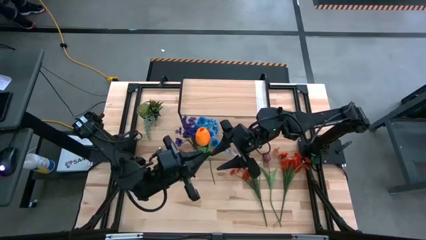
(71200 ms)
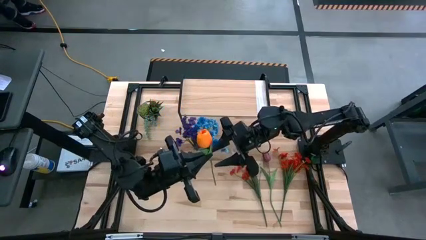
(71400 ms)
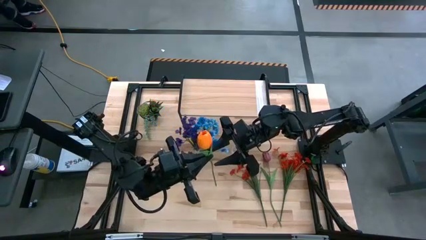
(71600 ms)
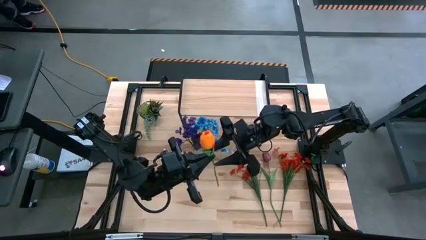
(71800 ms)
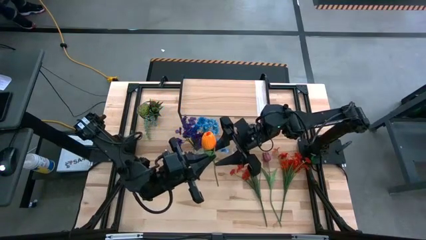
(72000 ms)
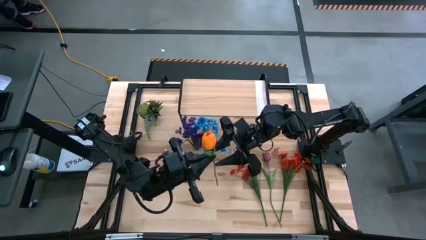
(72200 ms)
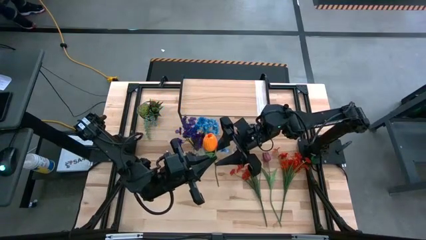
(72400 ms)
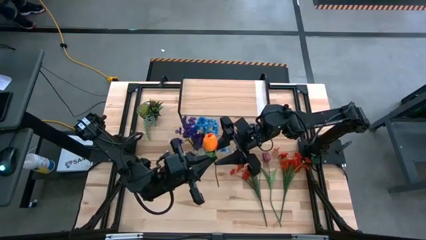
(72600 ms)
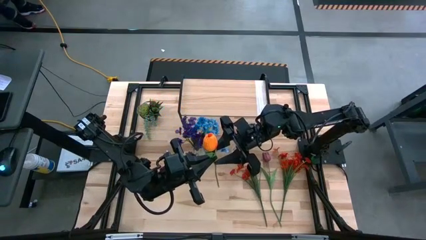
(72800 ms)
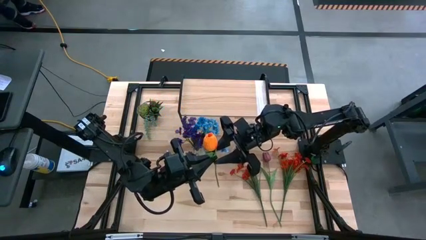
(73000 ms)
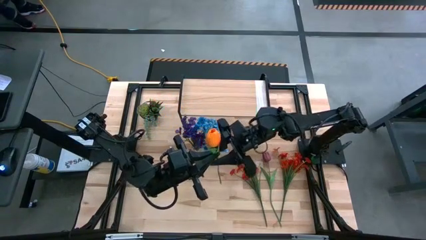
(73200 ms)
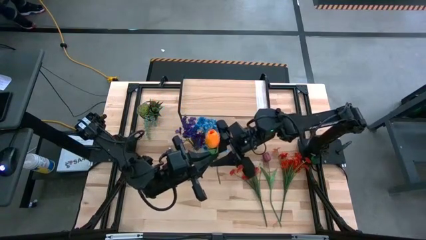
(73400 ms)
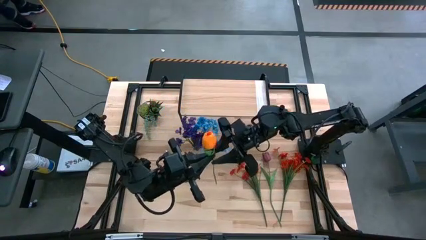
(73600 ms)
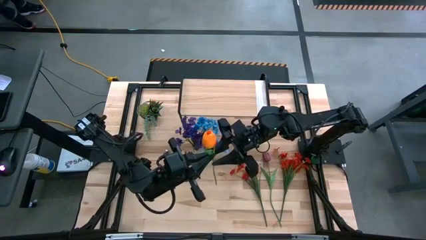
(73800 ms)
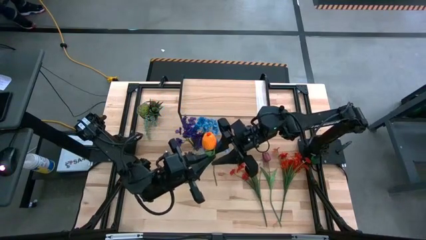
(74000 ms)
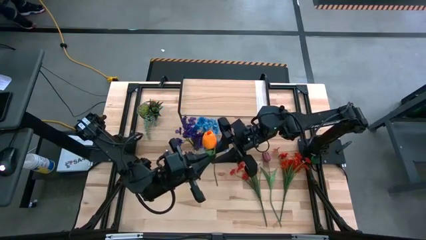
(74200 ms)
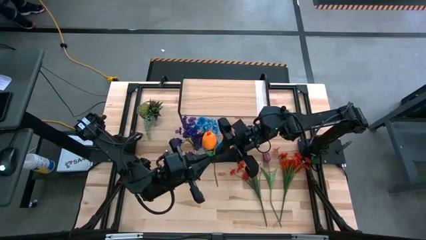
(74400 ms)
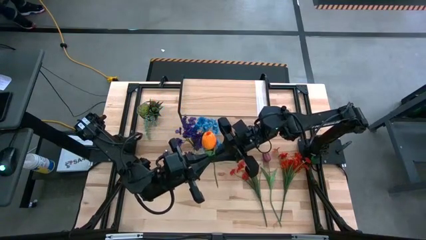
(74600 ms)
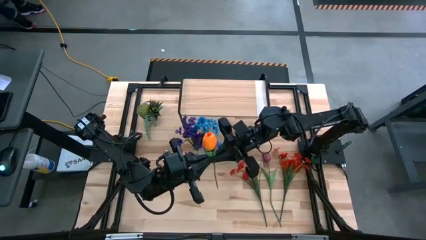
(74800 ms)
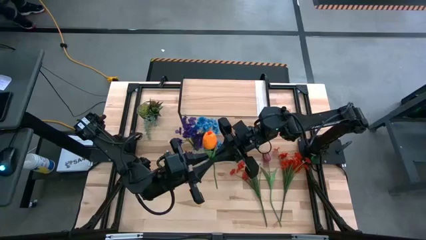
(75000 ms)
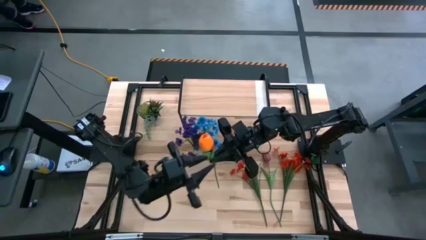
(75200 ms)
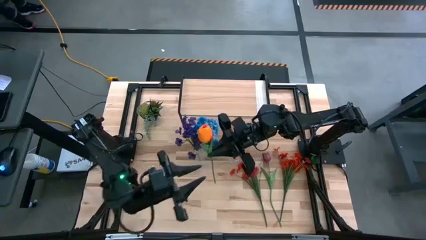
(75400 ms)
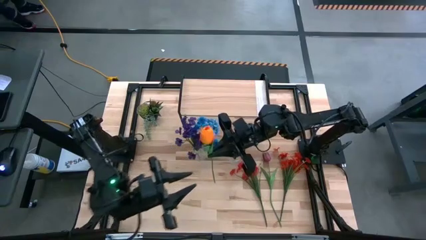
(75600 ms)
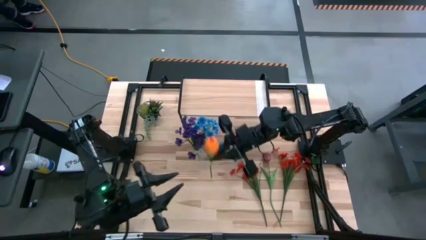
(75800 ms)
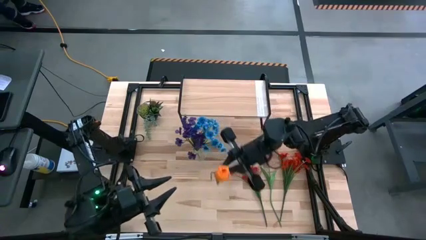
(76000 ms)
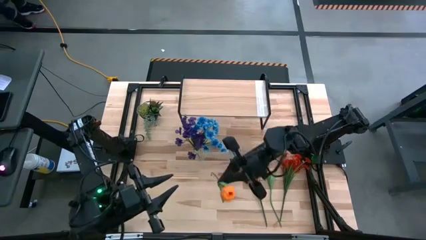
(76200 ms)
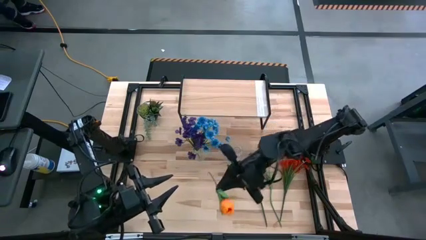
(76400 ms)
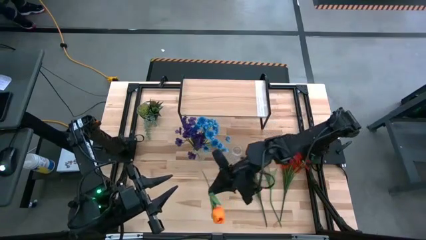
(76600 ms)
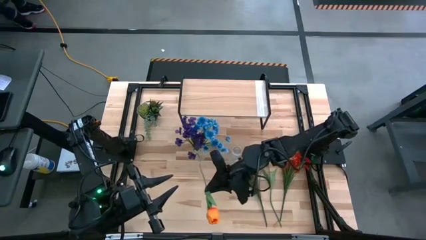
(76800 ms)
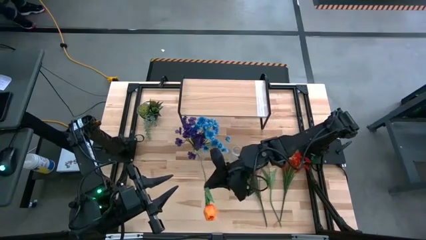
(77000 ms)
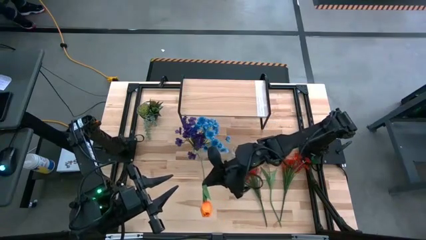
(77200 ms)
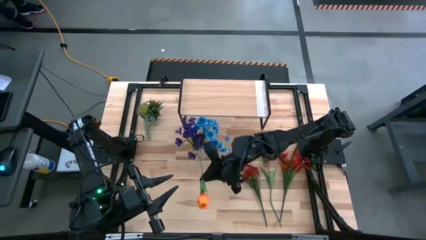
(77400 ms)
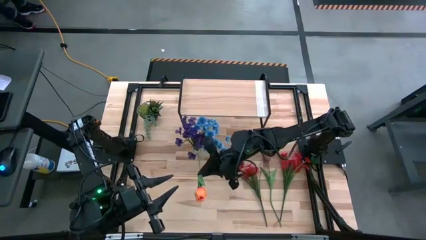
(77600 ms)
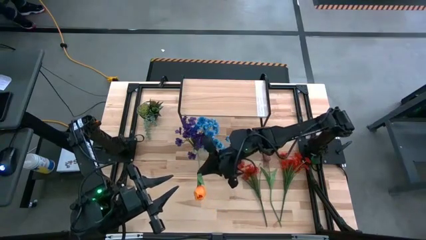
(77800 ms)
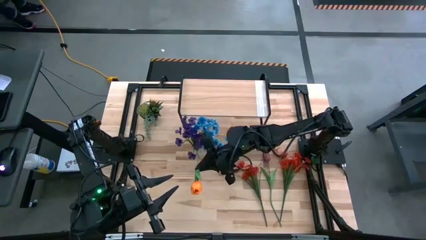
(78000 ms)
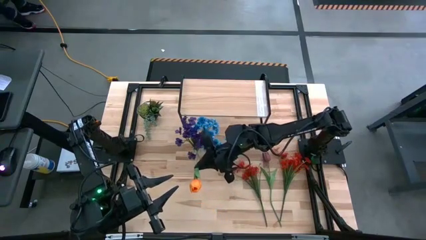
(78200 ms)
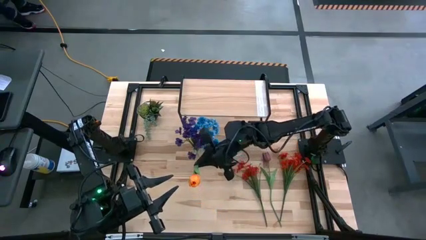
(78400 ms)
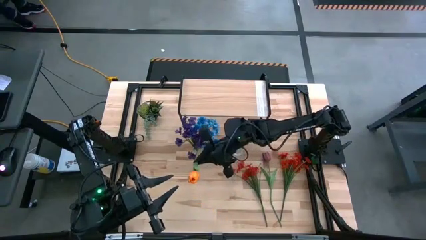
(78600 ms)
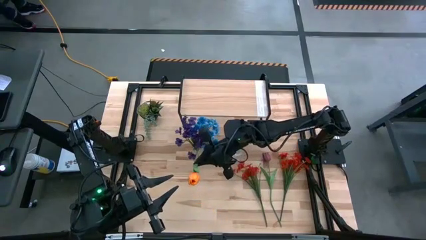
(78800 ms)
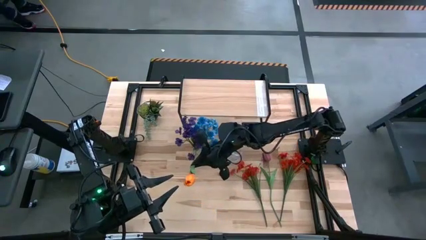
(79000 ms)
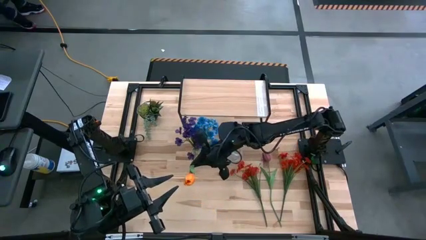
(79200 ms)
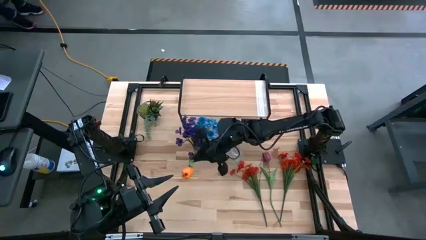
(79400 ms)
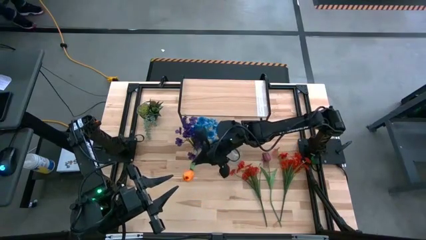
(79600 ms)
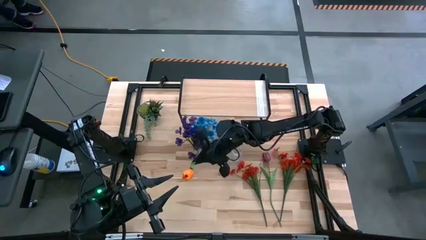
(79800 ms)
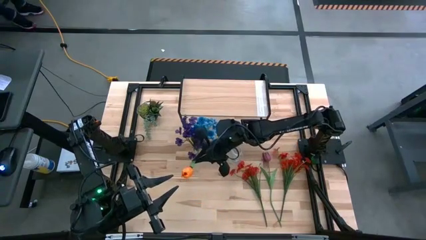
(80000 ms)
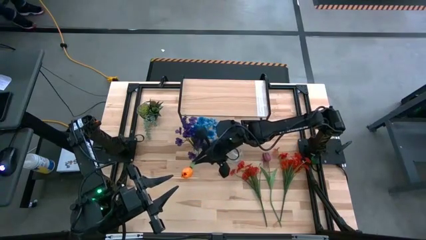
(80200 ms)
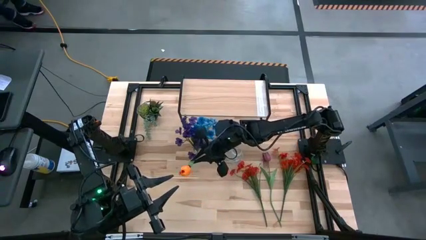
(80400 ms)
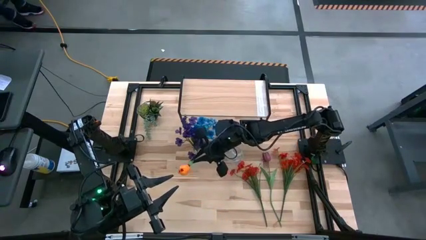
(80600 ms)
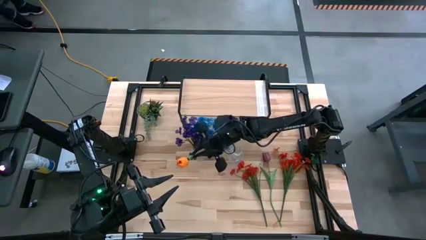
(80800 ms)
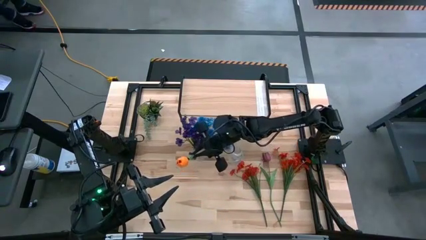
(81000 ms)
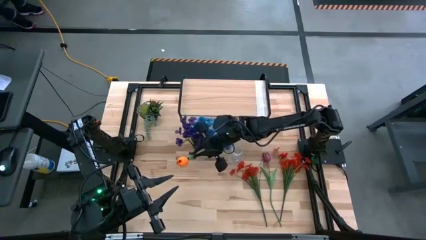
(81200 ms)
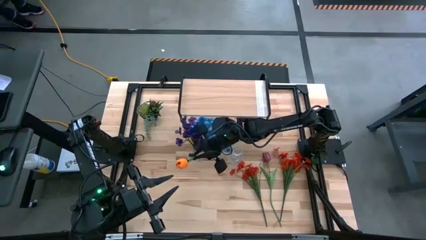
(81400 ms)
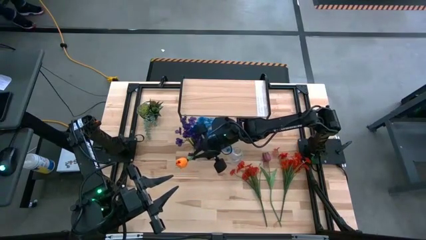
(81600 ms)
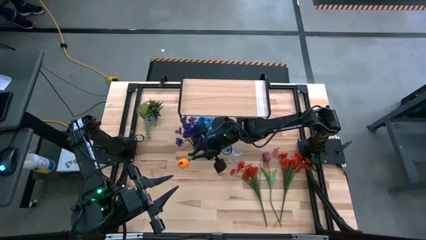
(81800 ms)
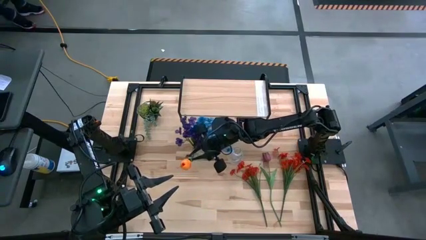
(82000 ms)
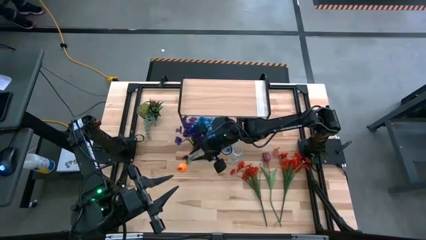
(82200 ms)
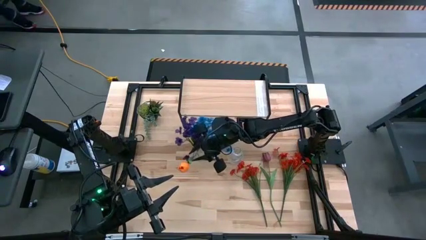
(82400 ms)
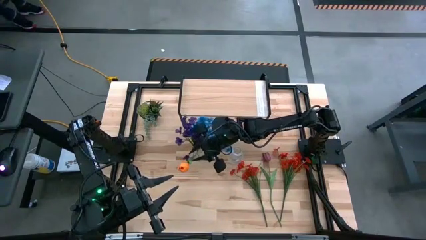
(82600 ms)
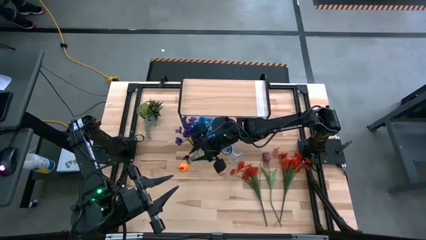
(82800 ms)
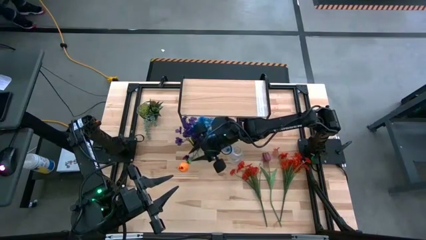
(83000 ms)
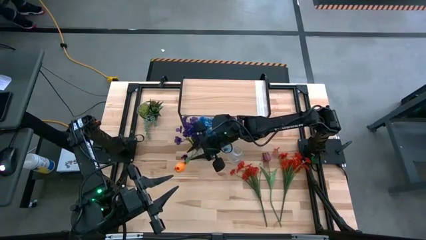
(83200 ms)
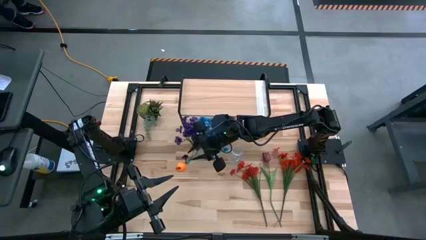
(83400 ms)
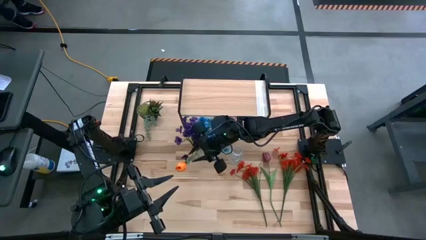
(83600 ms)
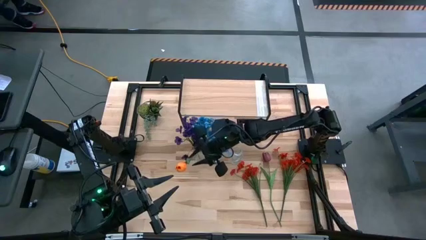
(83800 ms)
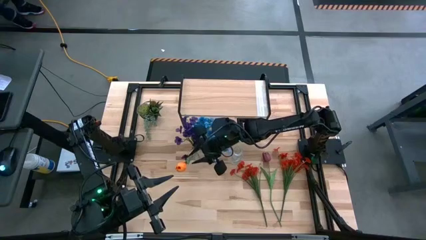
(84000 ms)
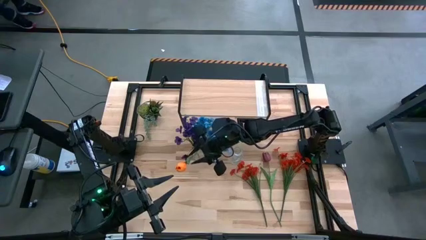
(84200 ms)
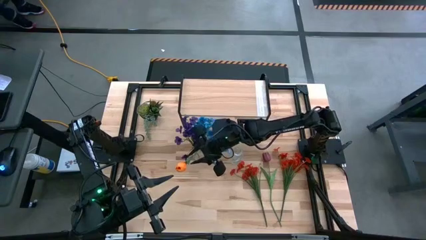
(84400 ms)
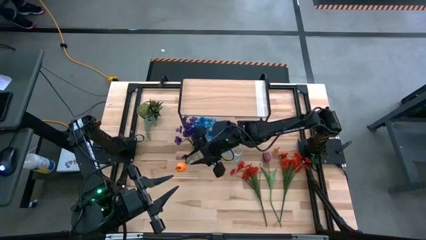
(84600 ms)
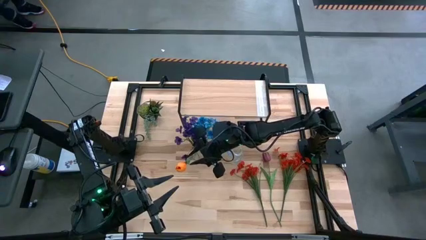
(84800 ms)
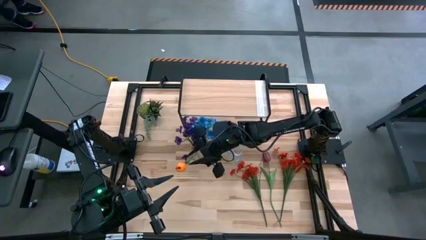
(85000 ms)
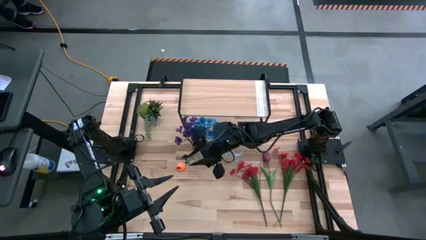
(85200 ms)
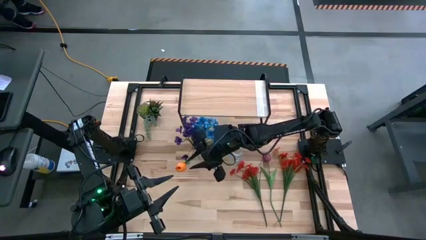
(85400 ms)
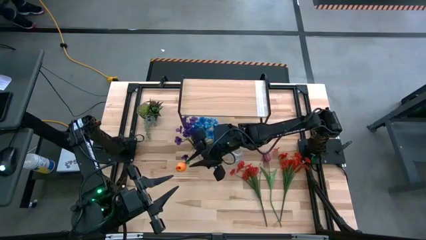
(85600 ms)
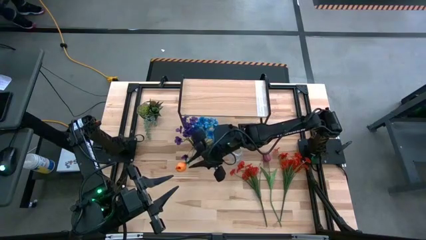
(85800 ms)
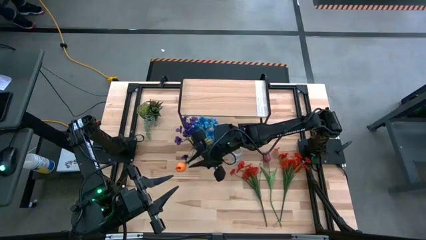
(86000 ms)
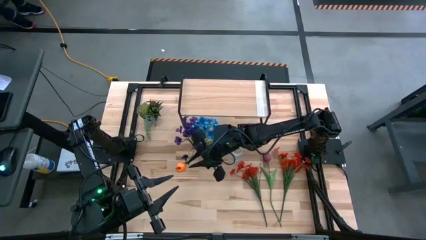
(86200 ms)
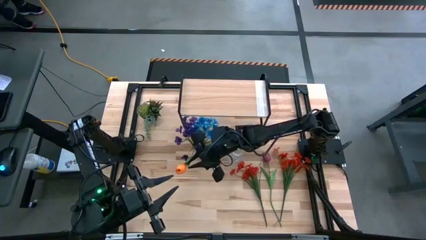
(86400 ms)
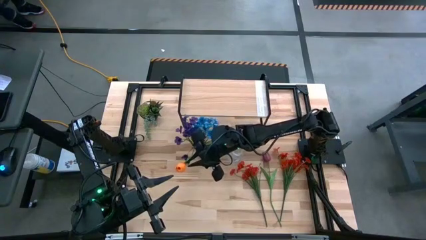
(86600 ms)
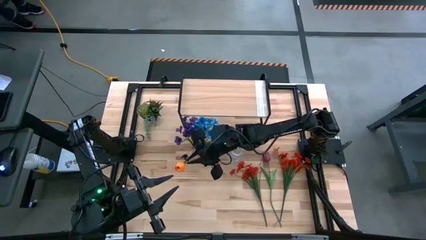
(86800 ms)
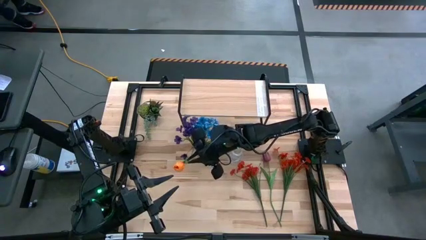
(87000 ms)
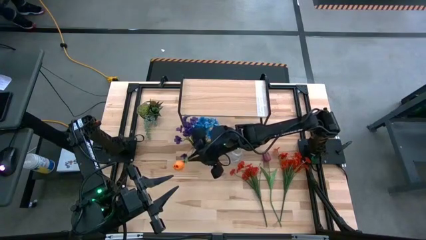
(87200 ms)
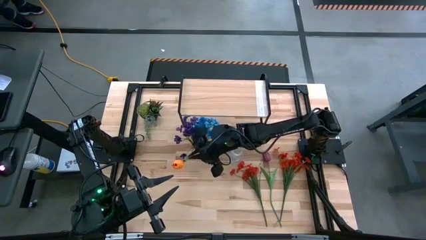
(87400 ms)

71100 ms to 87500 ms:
Task: Pick and place flowers into a vace then onto a shelf
Put the orange flower into the left transparent crystal vase
